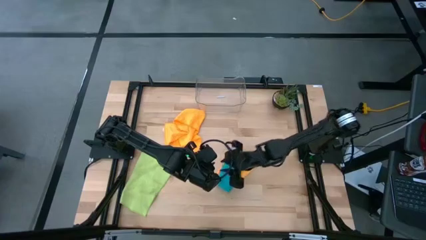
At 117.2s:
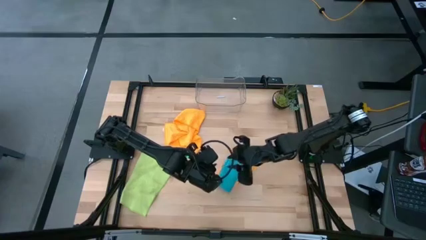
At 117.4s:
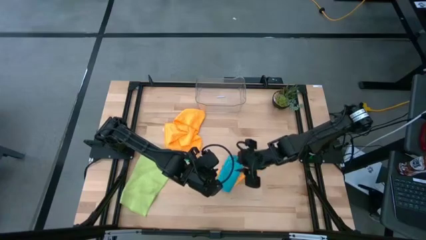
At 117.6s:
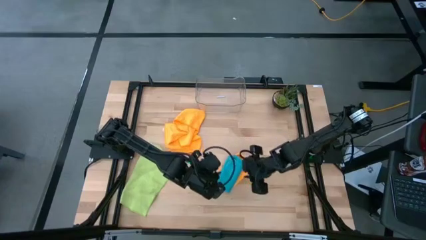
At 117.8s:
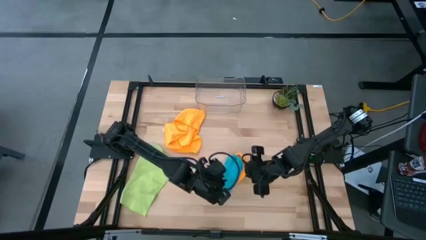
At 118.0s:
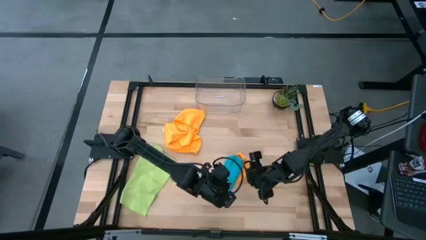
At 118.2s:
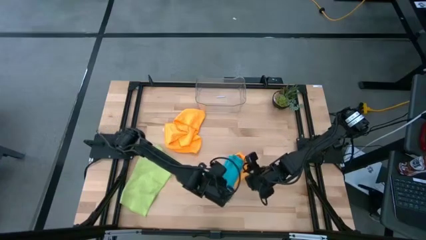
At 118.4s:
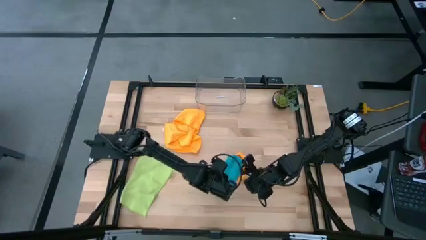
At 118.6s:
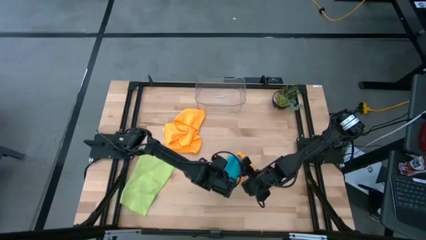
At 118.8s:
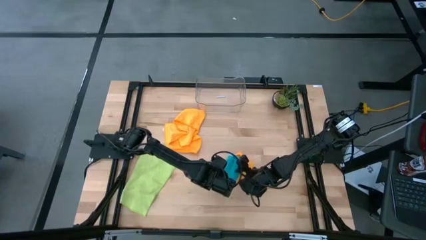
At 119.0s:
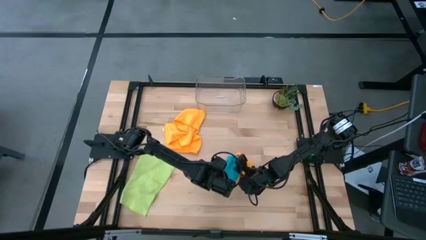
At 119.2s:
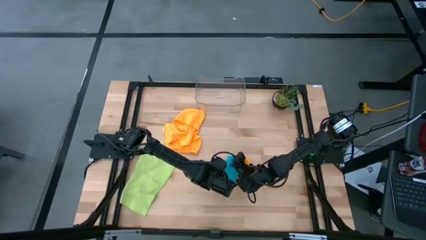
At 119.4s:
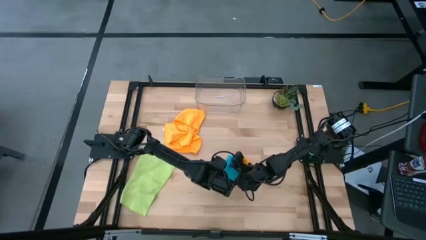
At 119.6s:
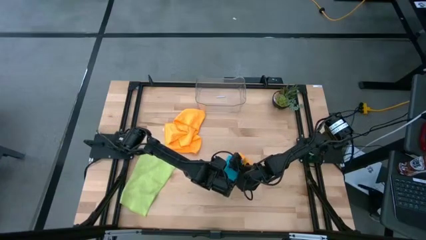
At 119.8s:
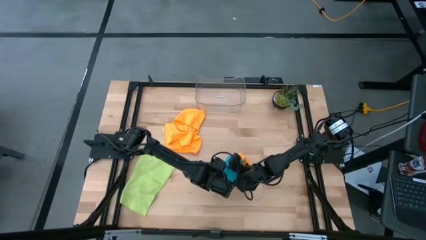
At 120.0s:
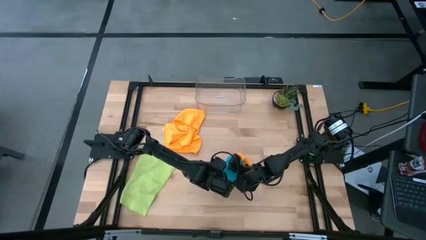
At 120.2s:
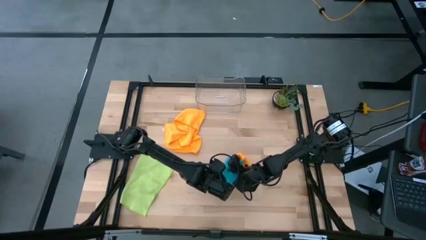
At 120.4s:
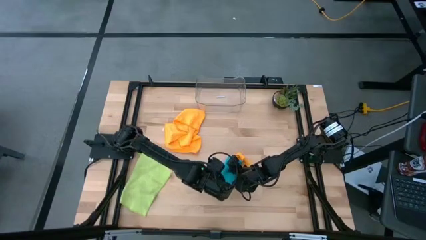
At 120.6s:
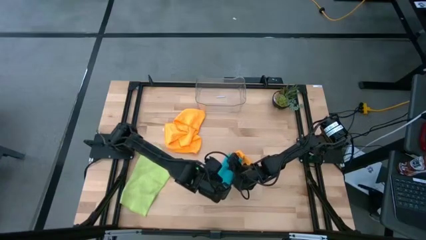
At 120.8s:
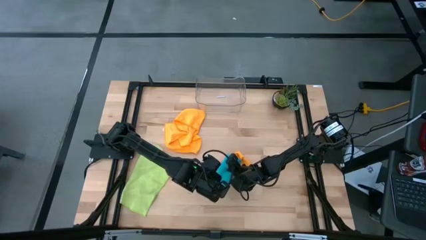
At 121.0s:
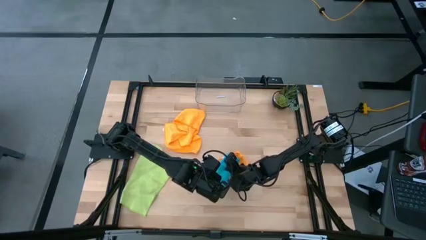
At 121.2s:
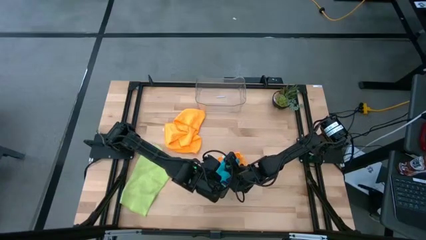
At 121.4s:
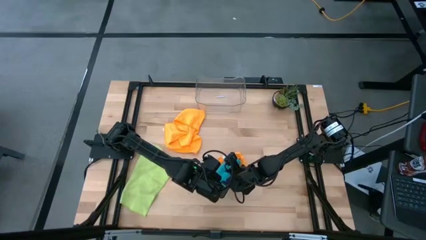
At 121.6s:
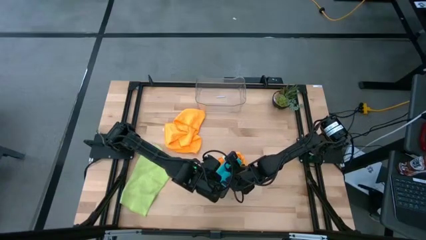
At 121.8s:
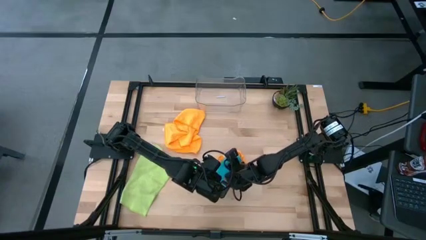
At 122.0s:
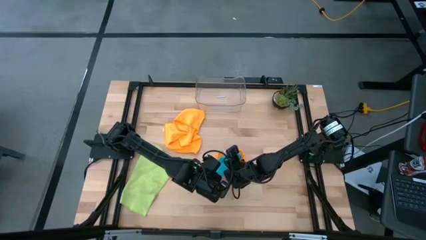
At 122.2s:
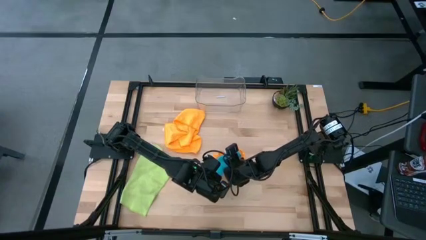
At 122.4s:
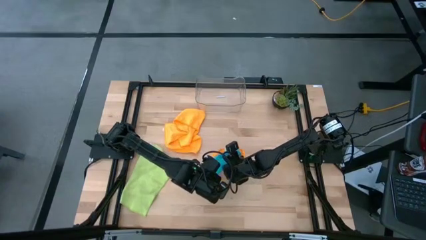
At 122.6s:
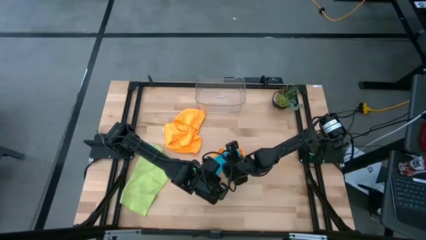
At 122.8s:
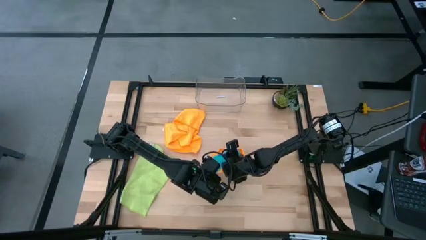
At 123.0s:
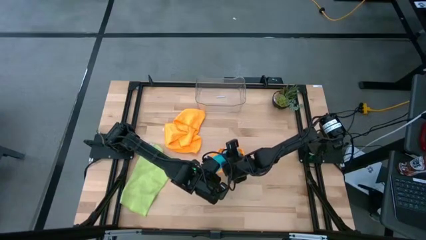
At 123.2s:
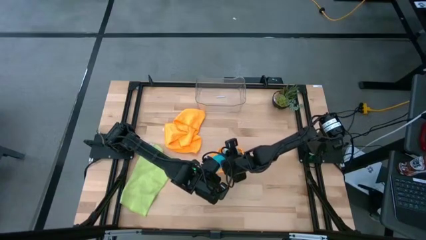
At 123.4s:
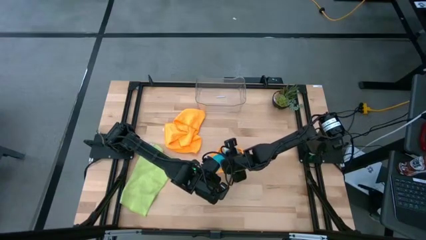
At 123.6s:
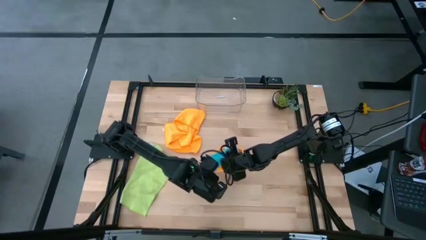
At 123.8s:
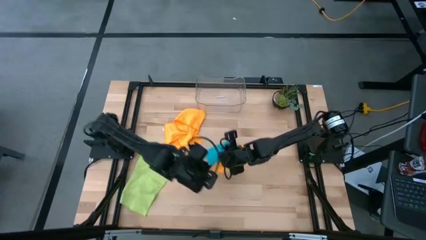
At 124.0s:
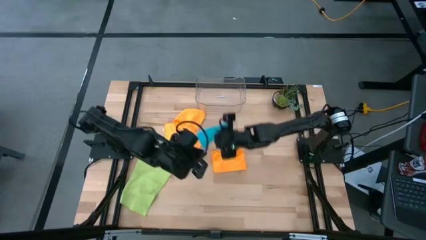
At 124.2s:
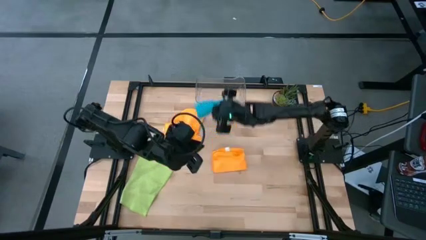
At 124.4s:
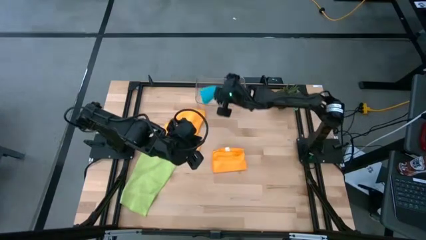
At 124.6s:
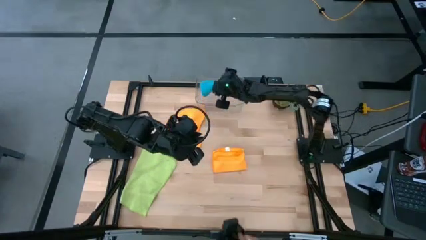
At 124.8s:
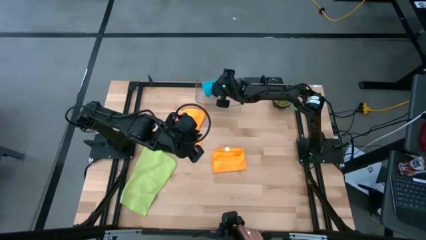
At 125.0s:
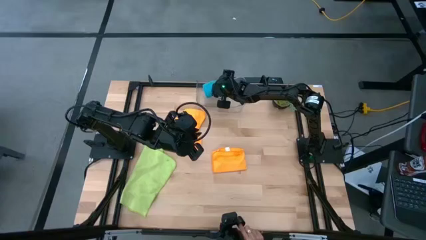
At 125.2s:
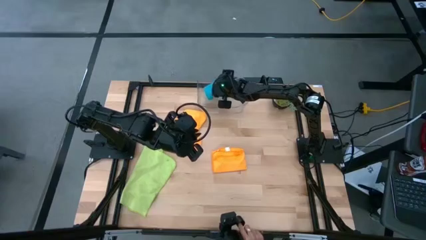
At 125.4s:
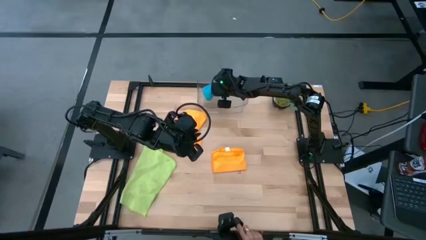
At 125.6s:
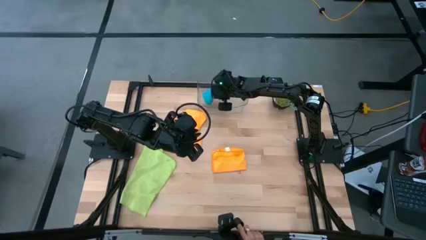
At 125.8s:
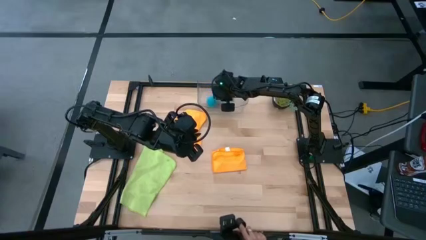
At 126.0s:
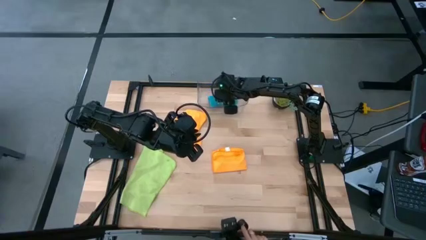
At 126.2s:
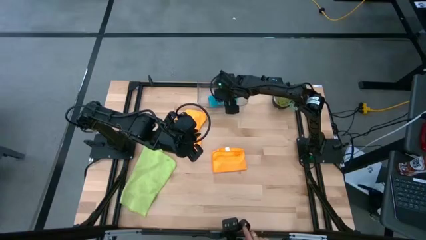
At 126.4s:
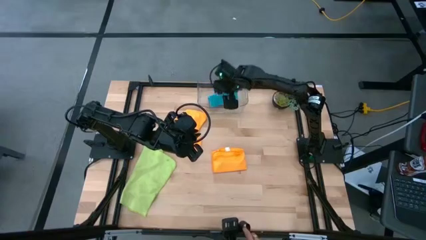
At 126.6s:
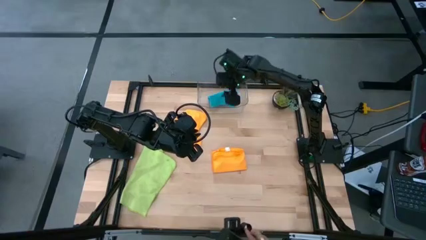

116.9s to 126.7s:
Task: Fold microfiber towels
Put the blue microfiber cloth into the transparent bin

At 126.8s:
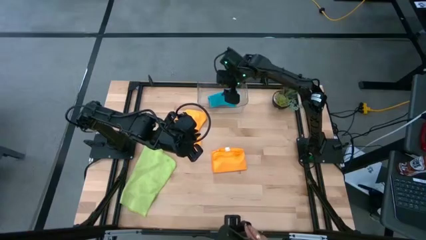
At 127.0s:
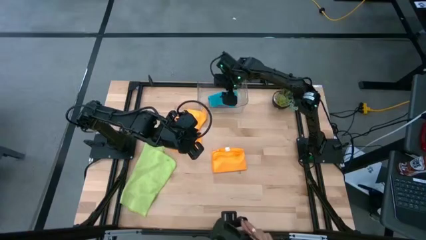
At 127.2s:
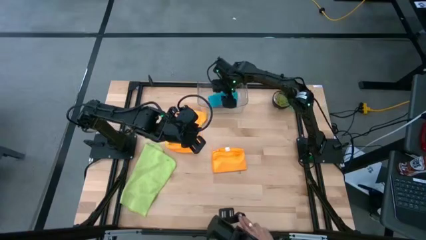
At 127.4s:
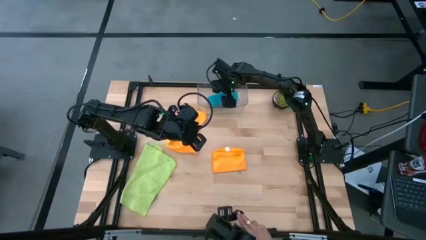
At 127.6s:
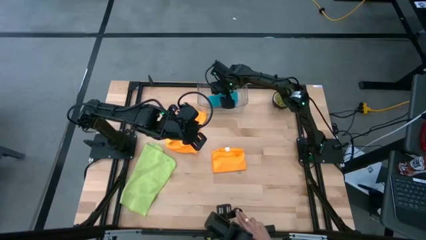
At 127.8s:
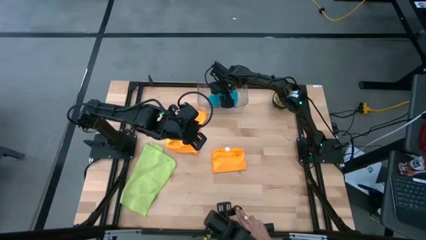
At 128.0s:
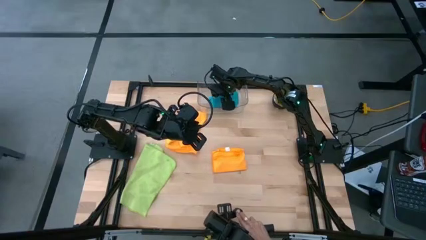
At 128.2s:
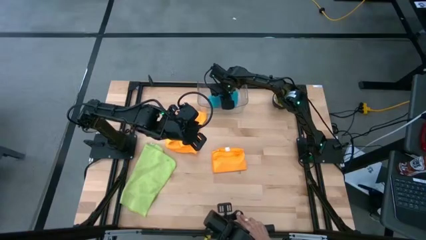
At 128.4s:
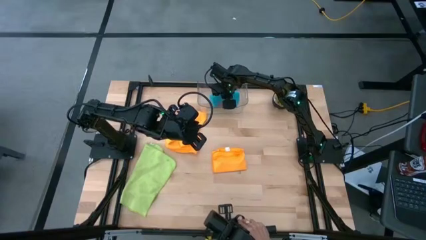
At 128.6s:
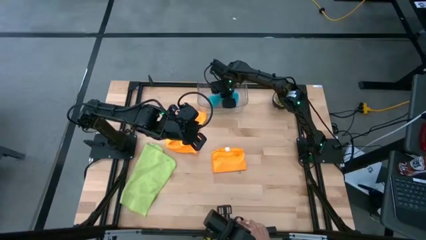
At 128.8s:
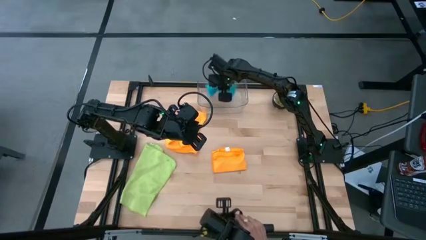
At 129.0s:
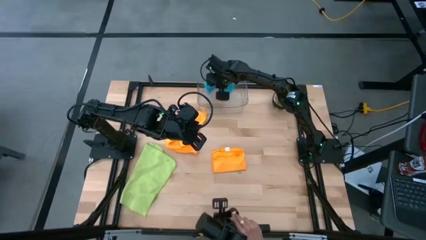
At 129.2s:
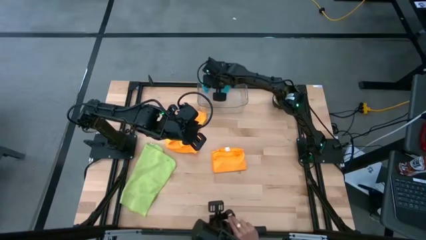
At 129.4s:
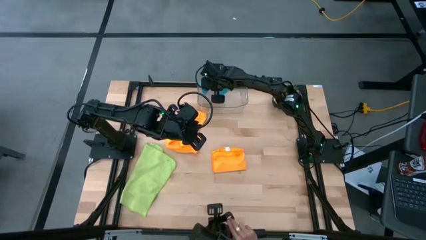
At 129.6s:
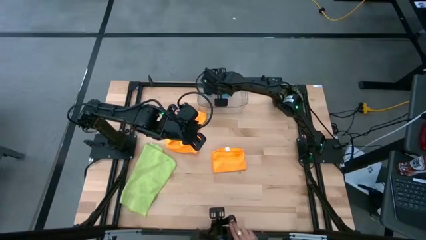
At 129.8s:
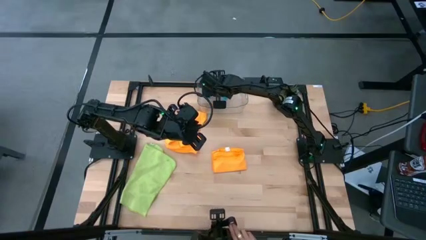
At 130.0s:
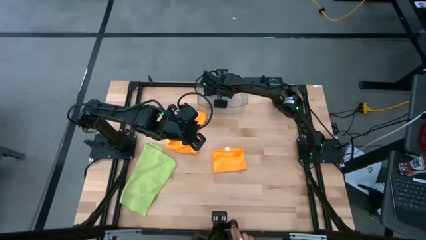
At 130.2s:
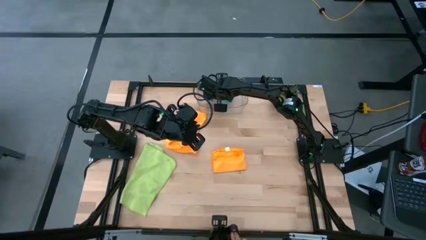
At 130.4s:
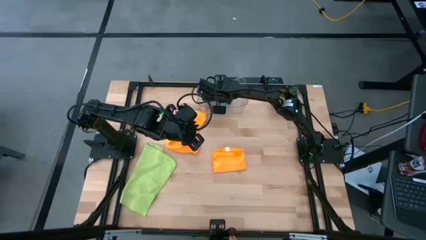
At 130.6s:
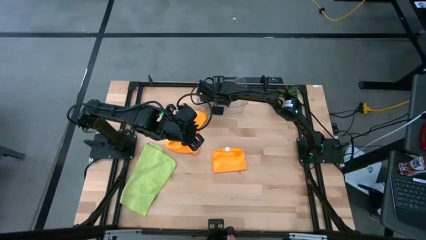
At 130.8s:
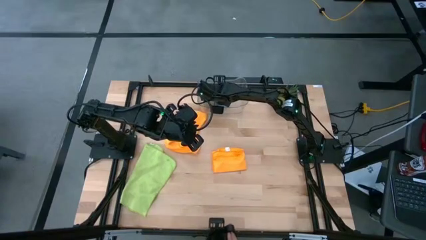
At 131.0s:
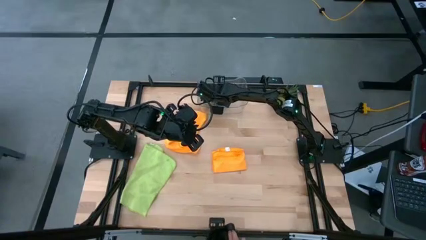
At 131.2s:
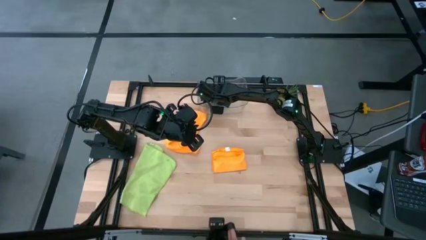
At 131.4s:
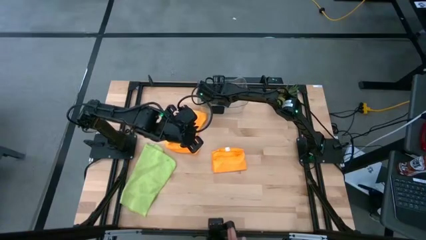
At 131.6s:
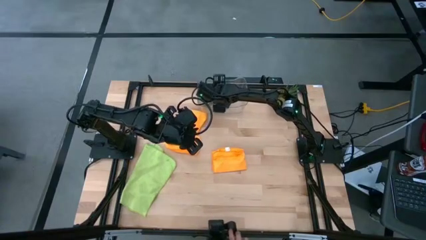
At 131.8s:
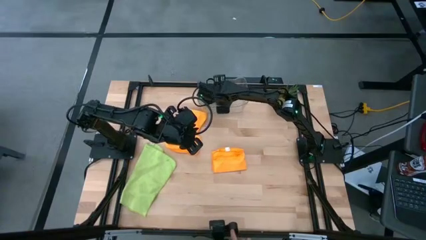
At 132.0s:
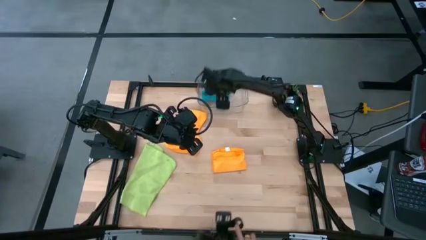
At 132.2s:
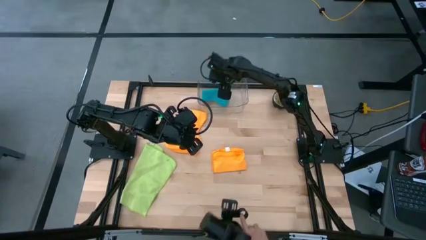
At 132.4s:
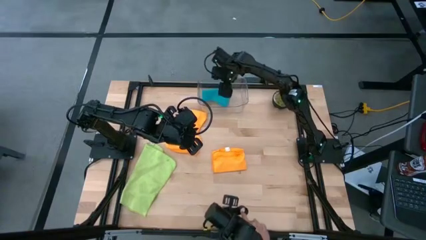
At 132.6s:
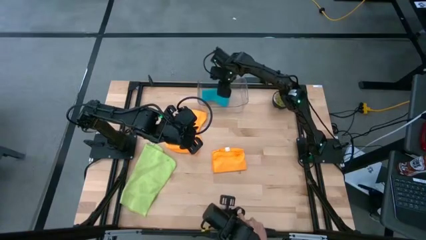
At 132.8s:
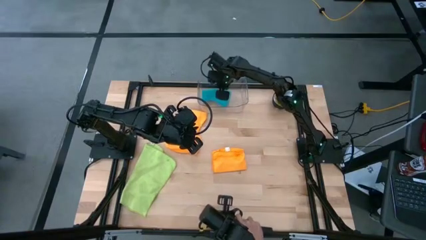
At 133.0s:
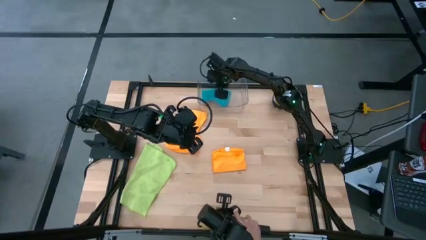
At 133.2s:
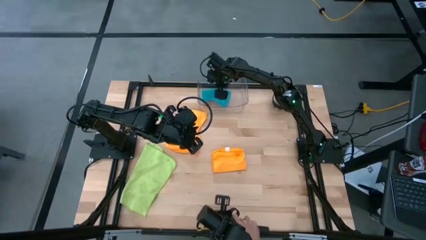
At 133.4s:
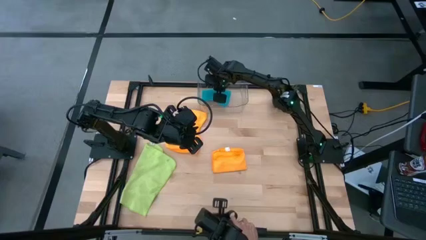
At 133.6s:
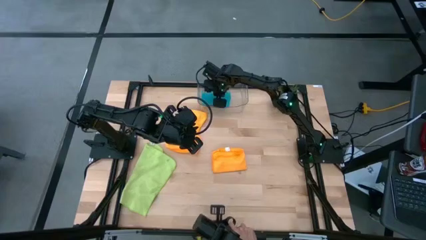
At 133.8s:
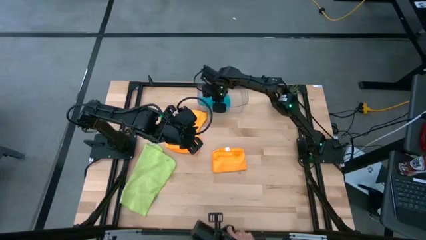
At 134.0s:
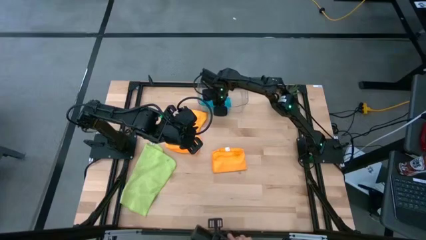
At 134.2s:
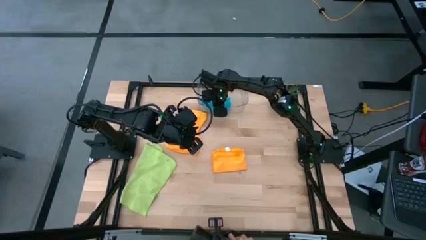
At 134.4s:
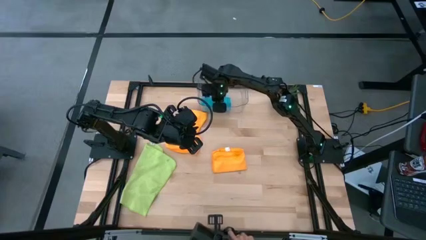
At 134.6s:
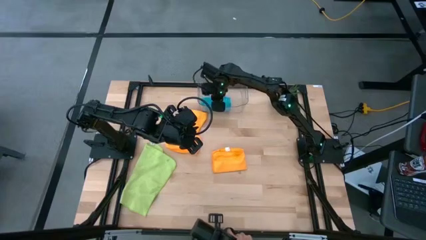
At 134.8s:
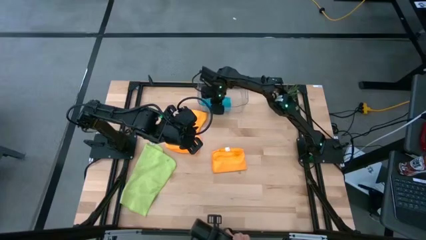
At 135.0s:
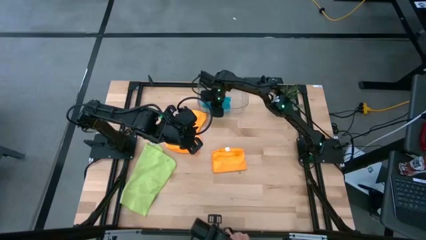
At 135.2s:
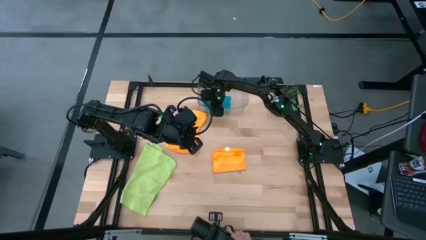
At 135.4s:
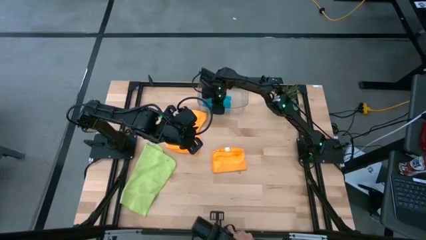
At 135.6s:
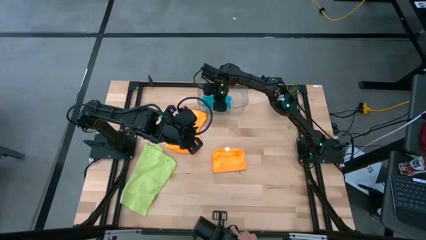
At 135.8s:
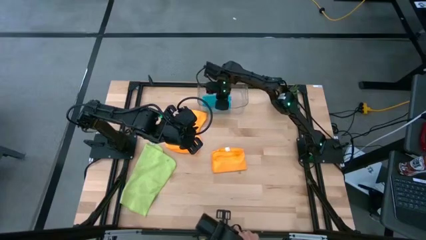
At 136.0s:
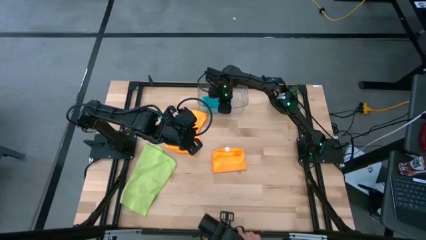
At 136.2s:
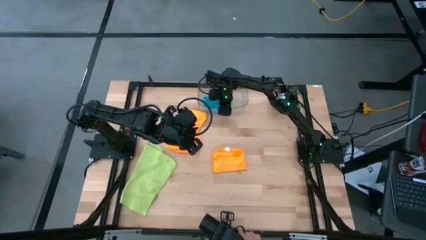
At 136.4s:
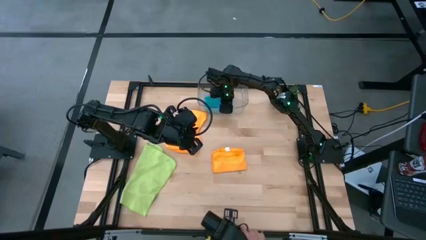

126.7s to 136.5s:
Put the blue microfiber cloth into the transparent bin
